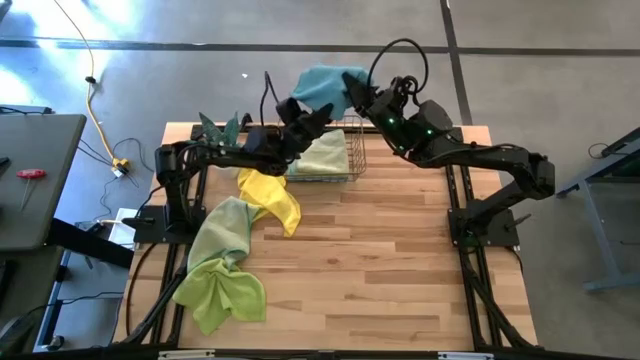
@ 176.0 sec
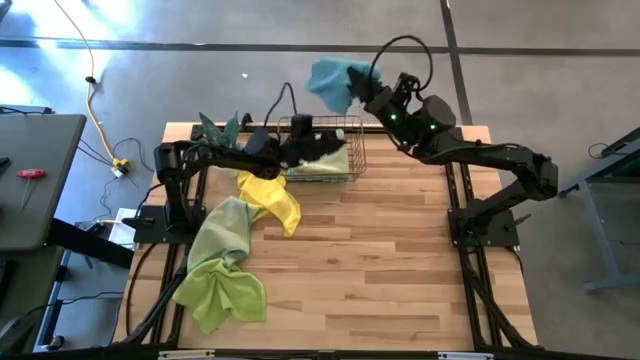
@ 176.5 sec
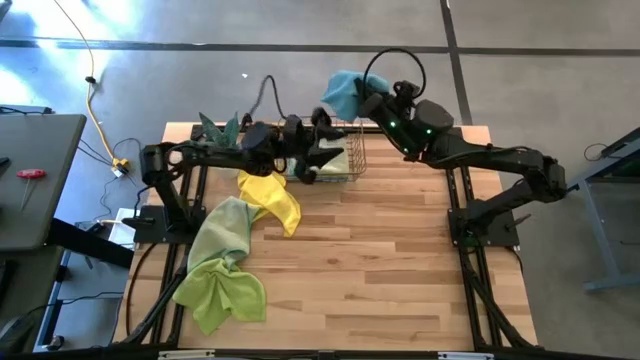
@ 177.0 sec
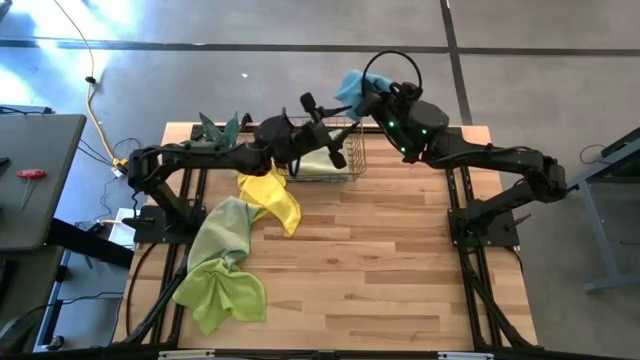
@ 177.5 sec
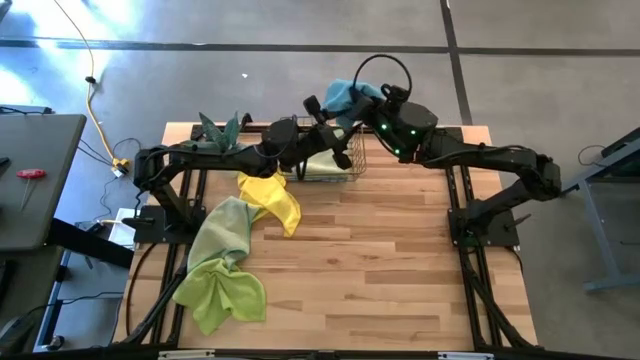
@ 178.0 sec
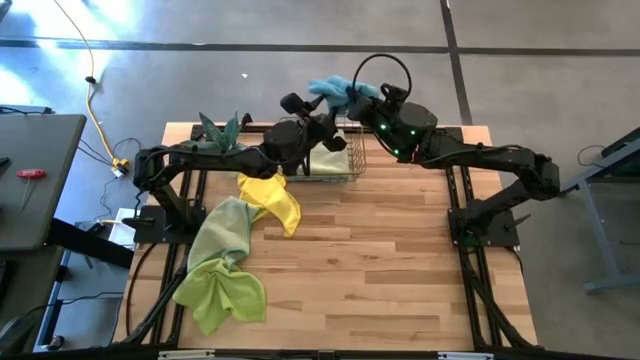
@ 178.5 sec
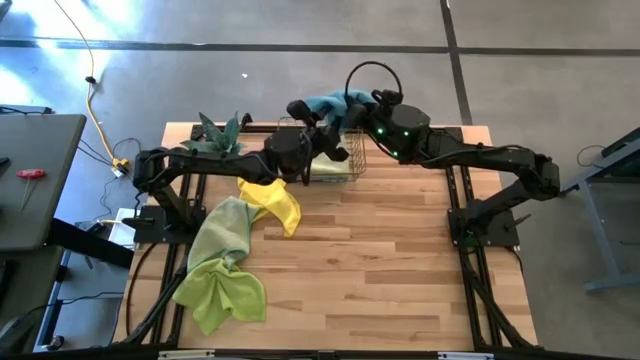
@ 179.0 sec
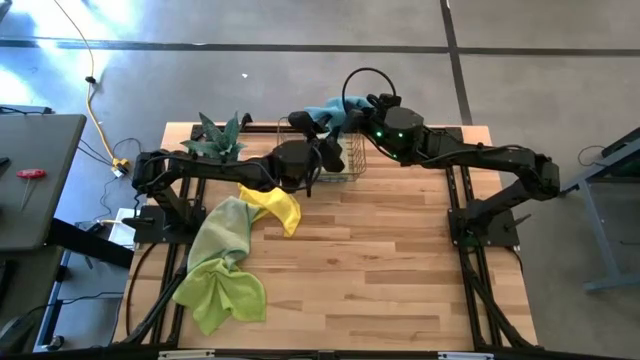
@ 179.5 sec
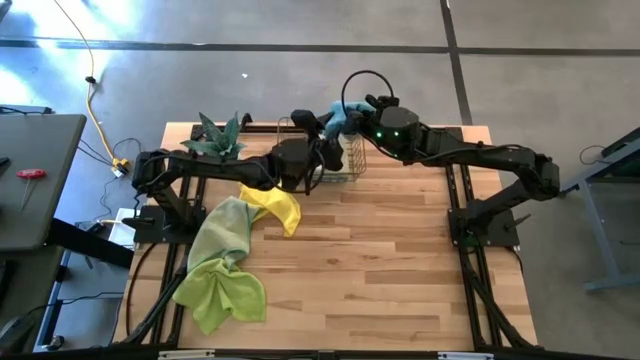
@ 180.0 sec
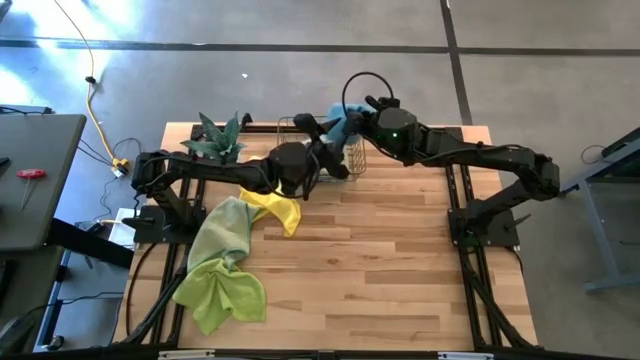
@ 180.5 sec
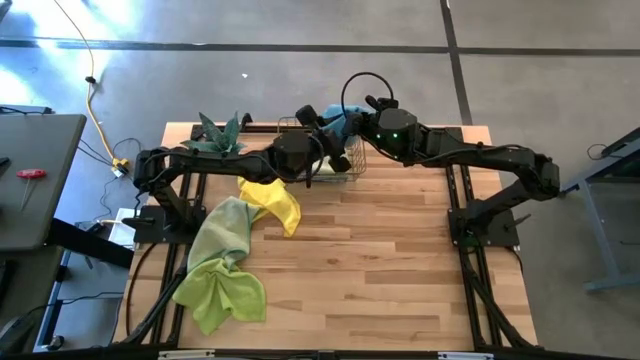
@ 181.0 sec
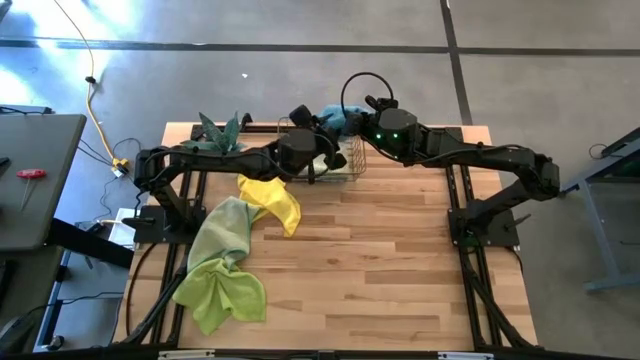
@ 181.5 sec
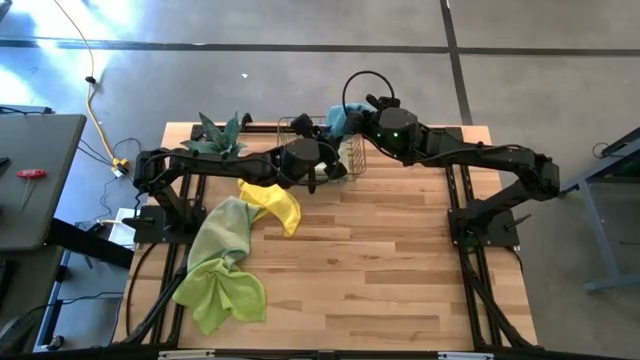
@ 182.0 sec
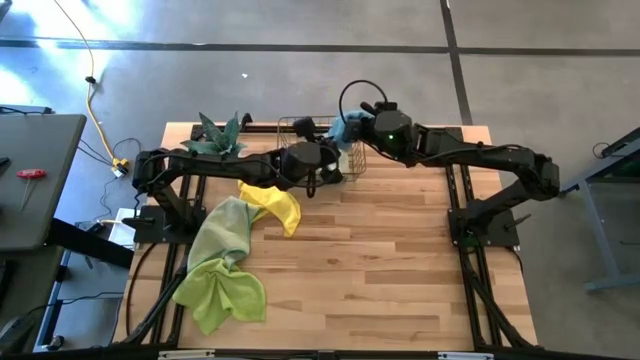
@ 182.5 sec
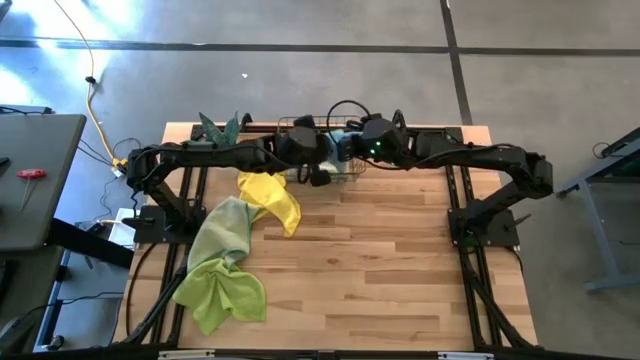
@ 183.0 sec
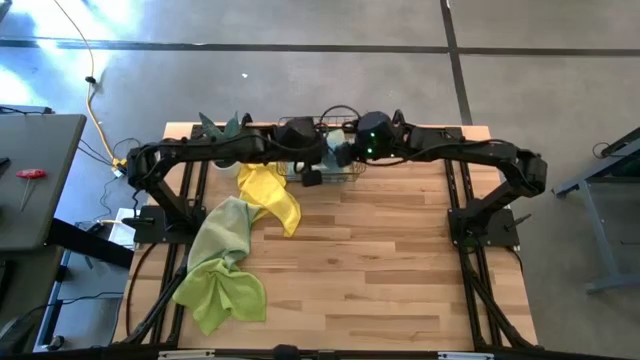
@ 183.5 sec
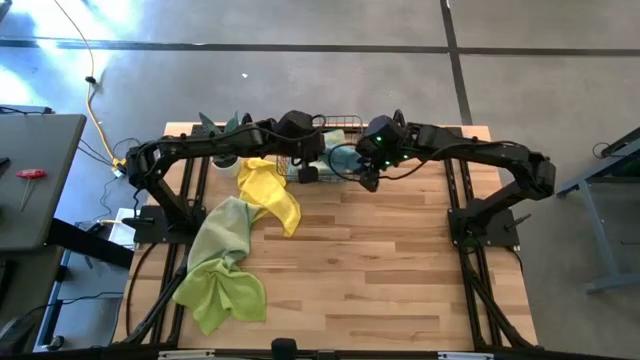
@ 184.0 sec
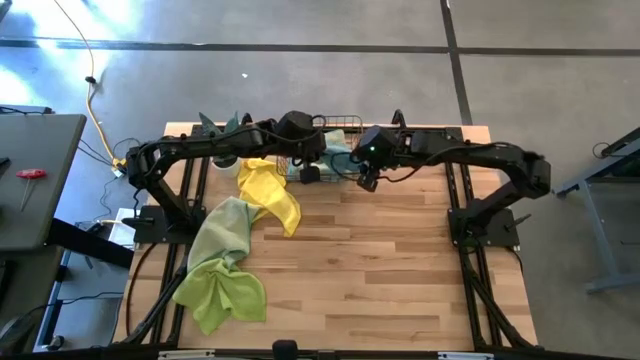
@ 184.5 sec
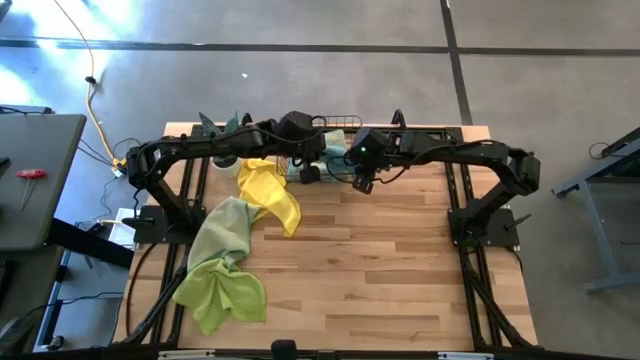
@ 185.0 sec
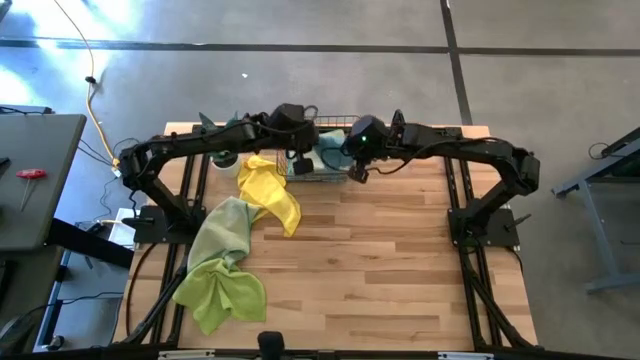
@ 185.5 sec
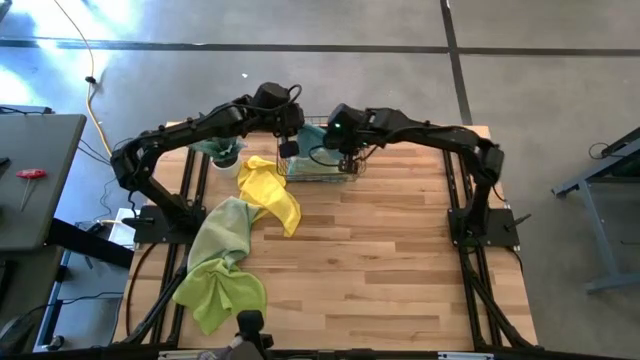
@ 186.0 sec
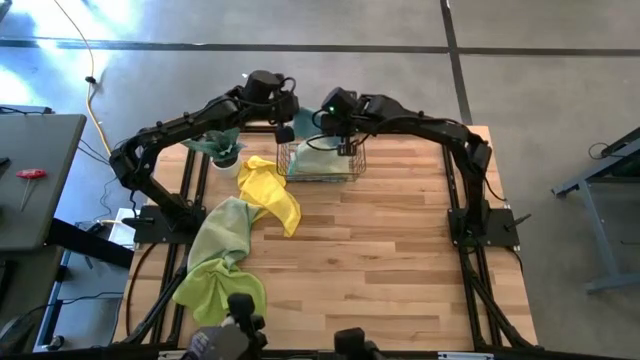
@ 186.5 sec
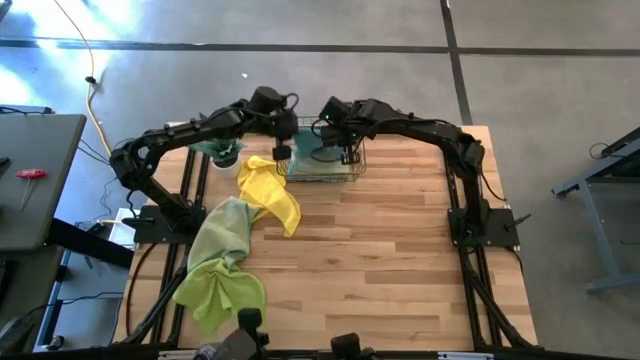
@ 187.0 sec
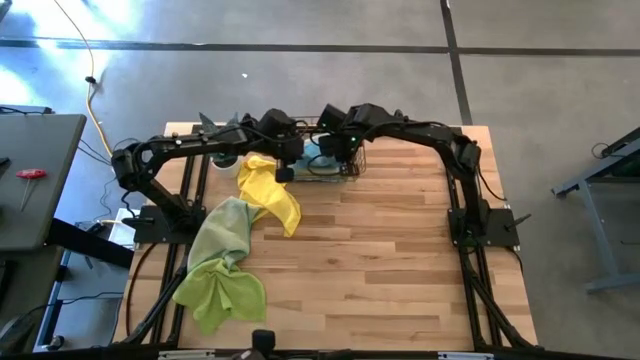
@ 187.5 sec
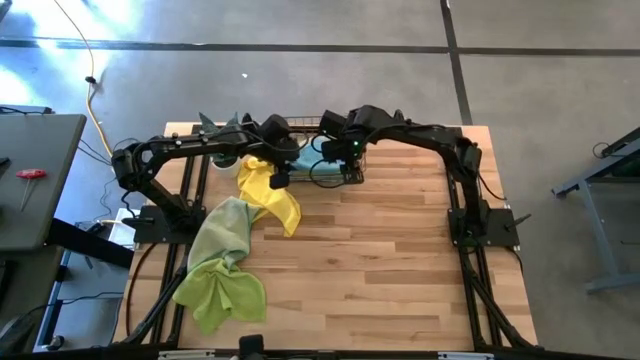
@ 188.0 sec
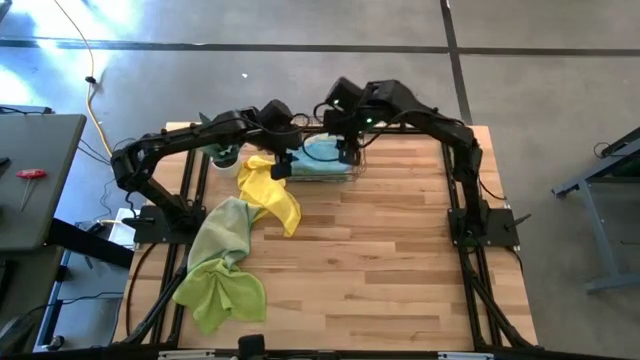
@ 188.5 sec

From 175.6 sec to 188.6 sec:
Task: Fold microfiber towels
Put the blue microfiber cloth in the basket

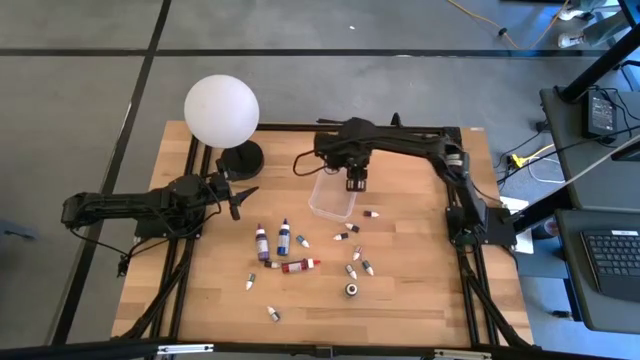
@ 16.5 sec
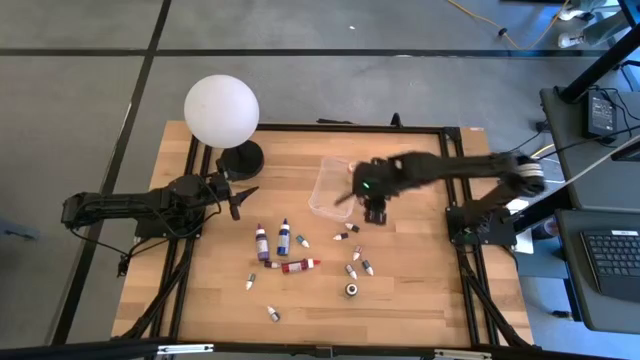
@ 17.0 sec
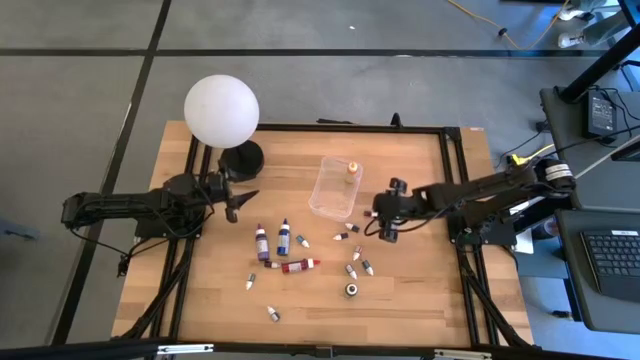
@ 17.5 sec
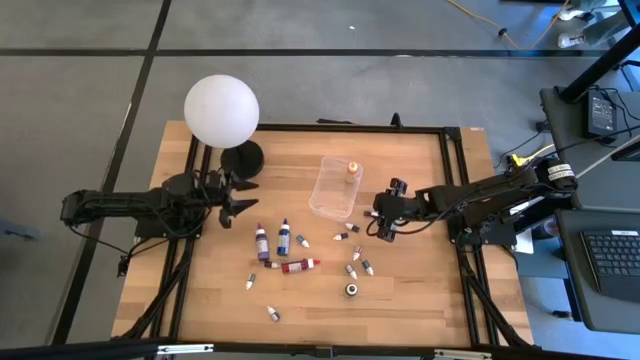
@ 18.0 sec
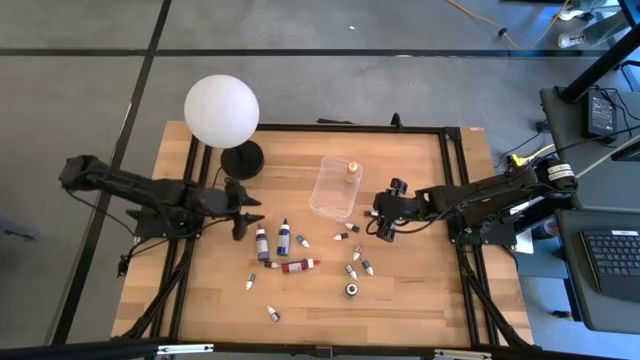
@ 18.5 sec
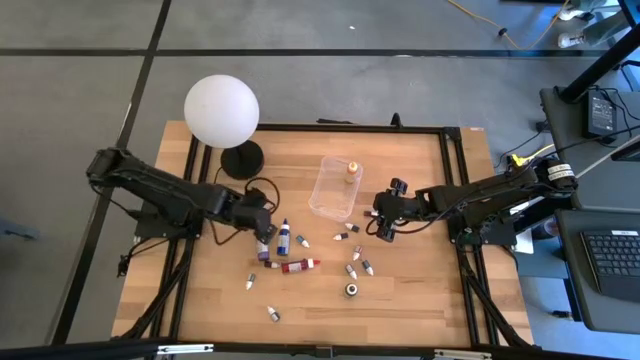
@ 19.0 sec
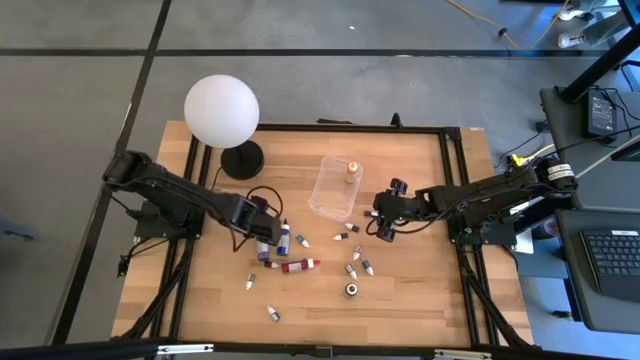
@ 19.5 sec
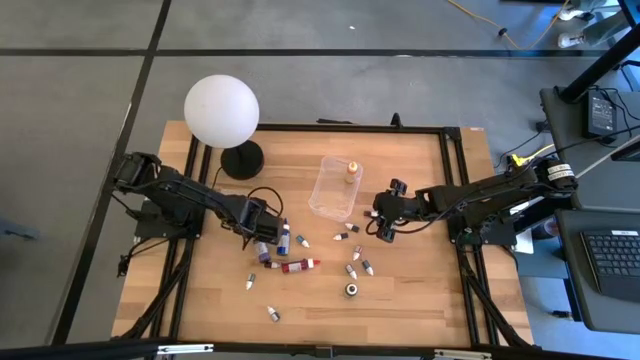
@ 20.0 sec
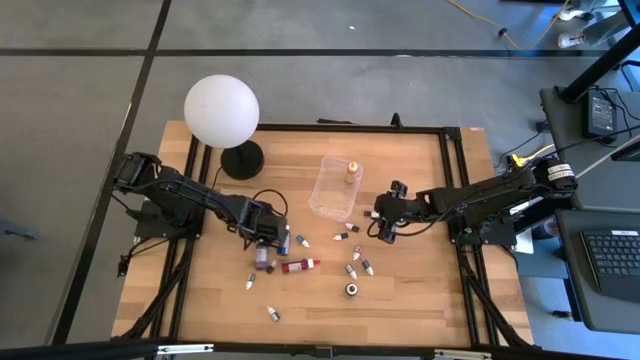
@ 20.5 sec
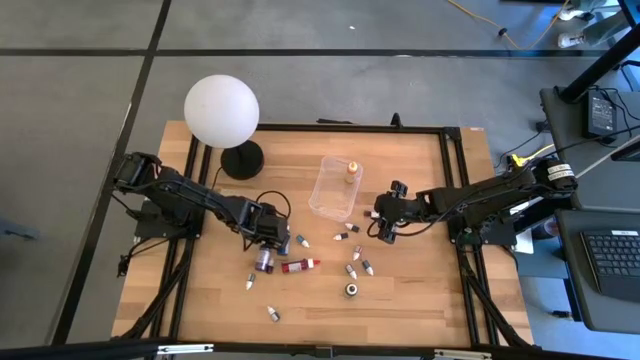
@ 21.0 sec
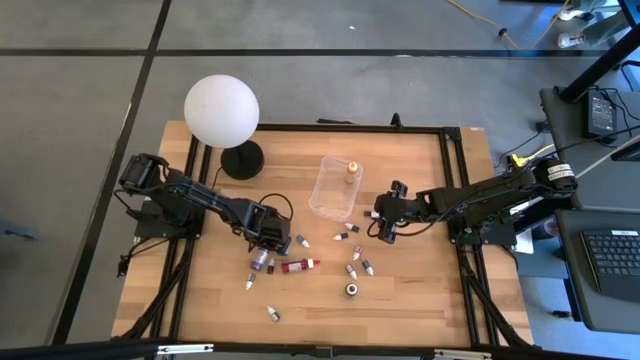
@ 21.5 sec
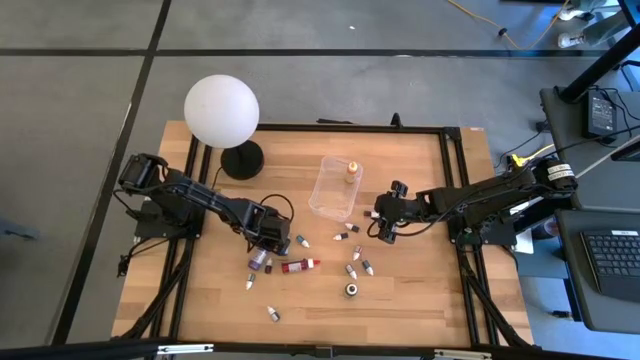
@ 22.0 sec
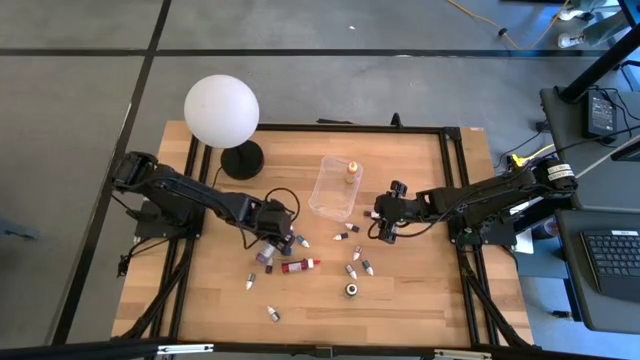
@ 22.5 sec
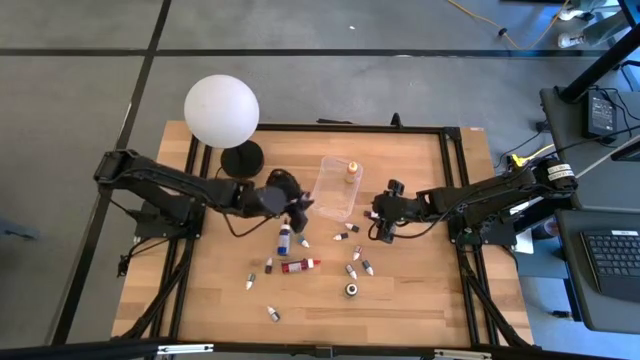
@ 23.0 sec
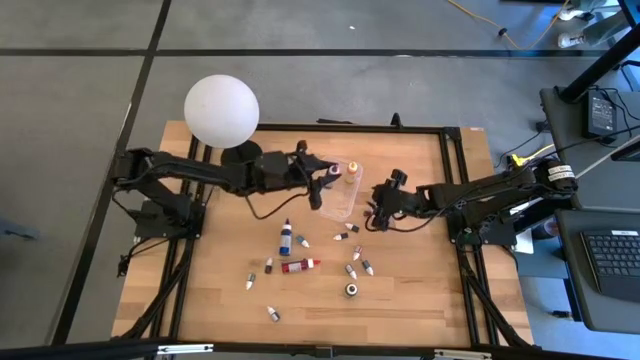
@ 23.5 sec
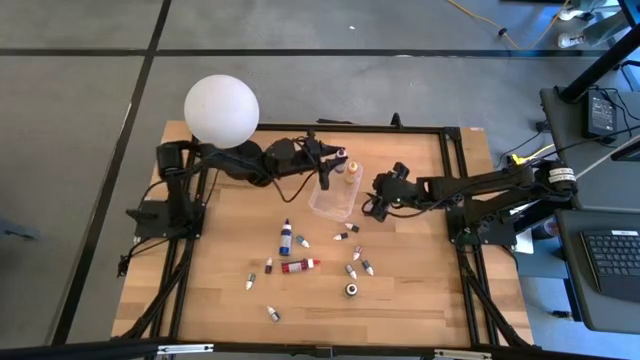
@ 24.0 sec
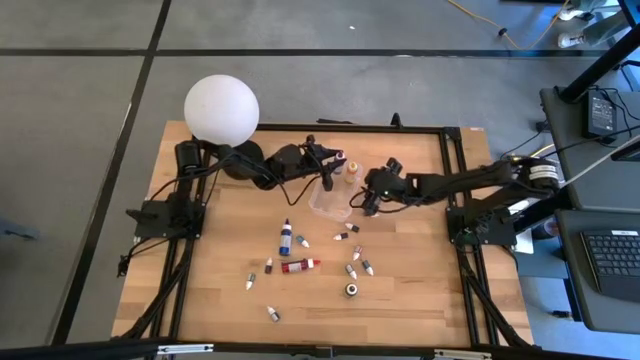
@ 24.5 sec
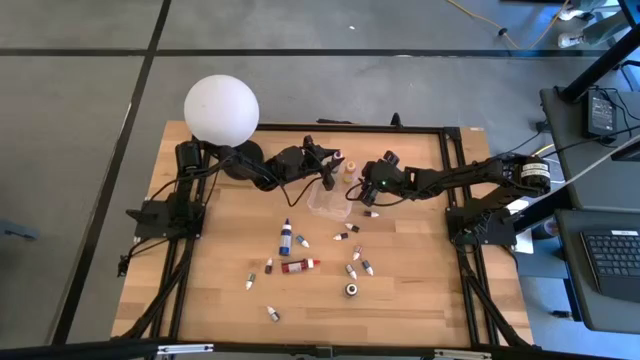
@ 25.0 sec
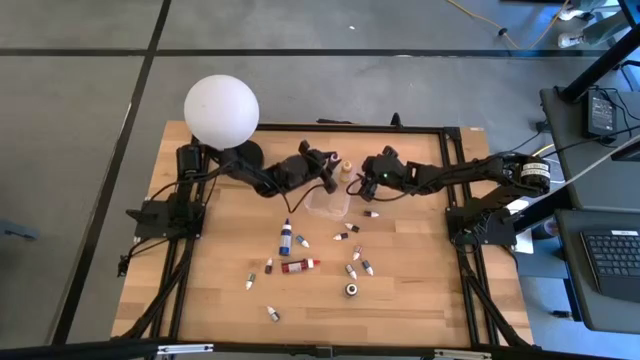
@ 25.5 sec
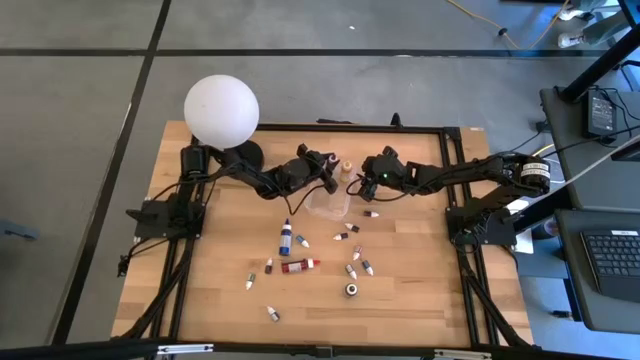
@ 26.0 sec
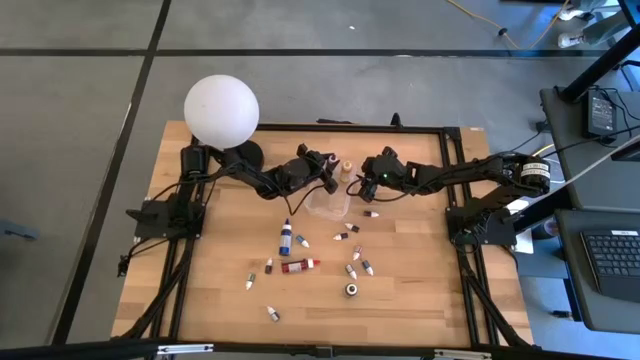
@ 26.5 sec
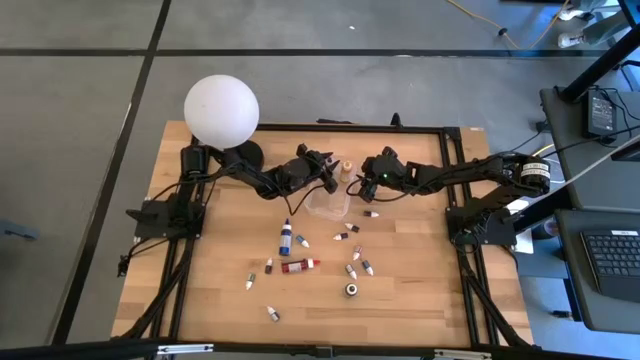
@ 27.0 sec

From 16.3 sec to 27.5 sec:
Task: Pick & Place food coloring
Put the large purple food coloring bottle in the transparent bin
